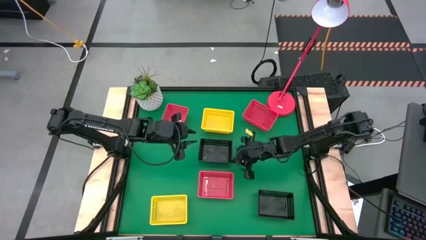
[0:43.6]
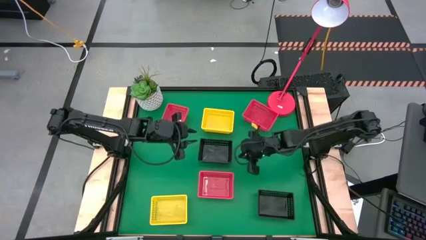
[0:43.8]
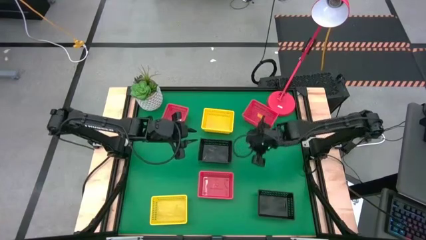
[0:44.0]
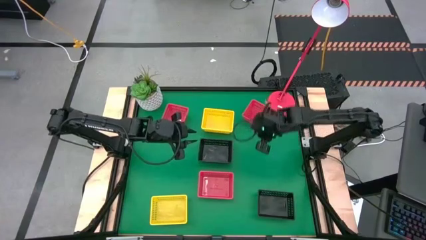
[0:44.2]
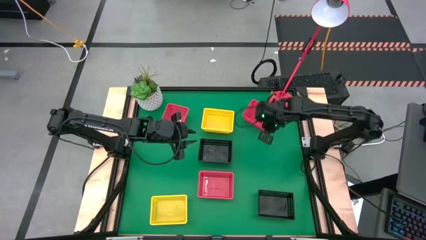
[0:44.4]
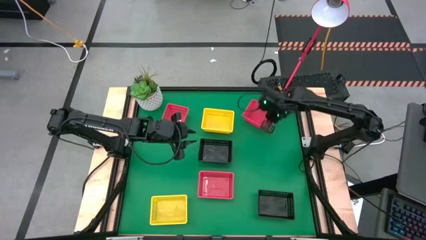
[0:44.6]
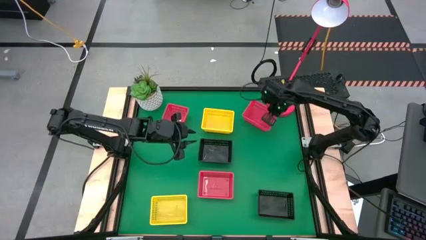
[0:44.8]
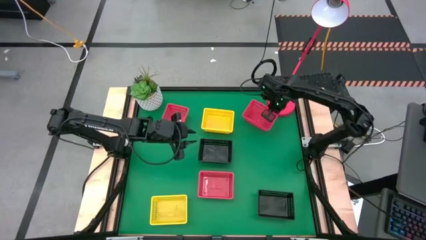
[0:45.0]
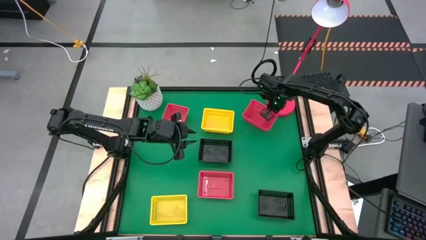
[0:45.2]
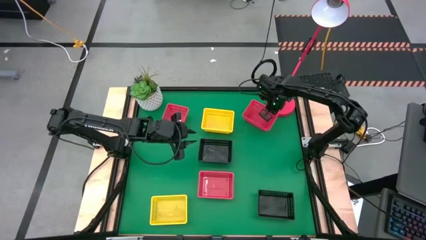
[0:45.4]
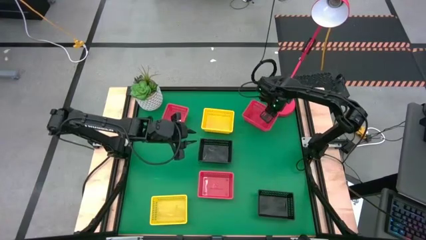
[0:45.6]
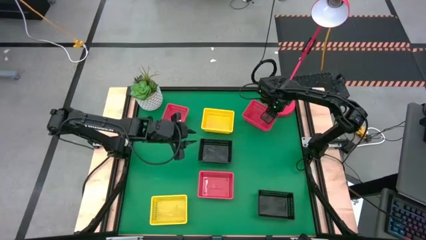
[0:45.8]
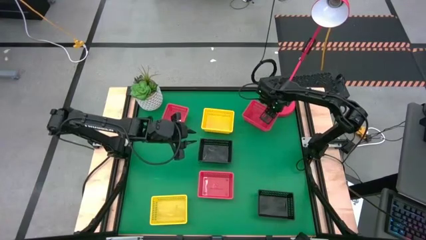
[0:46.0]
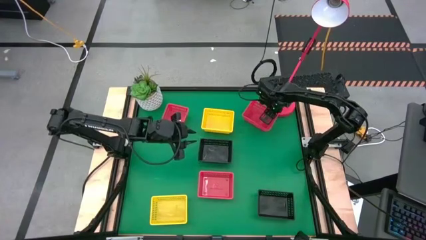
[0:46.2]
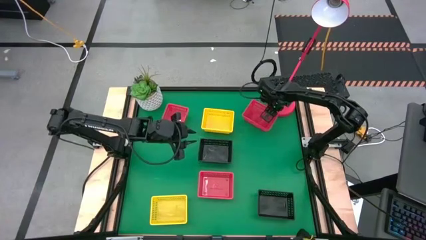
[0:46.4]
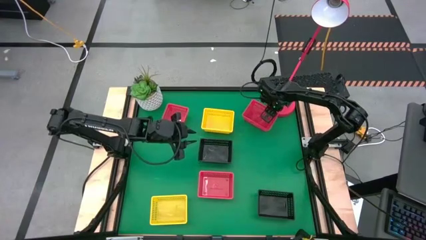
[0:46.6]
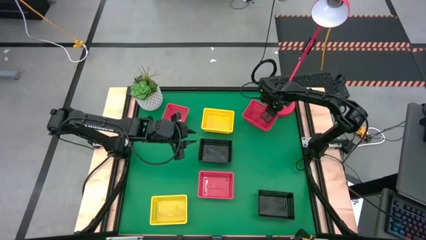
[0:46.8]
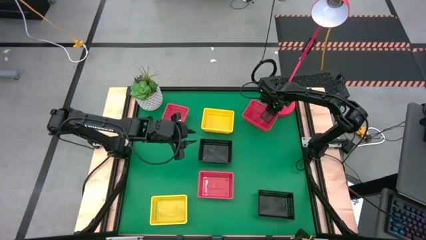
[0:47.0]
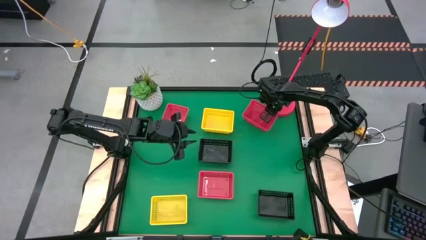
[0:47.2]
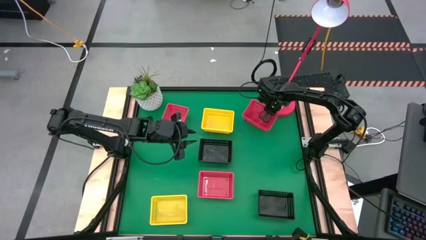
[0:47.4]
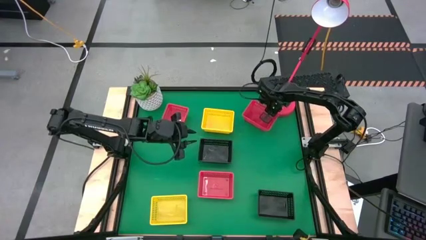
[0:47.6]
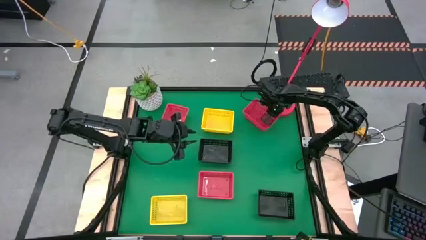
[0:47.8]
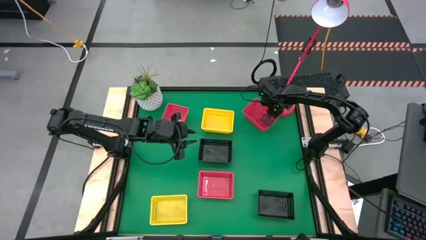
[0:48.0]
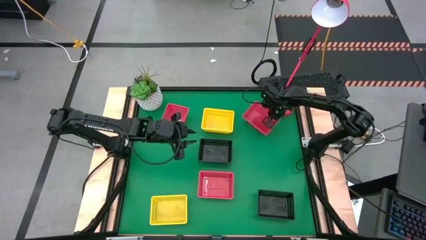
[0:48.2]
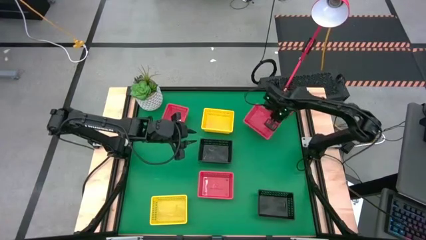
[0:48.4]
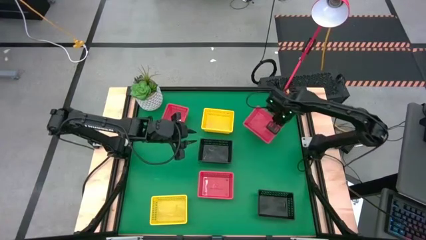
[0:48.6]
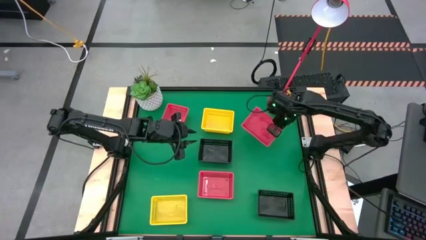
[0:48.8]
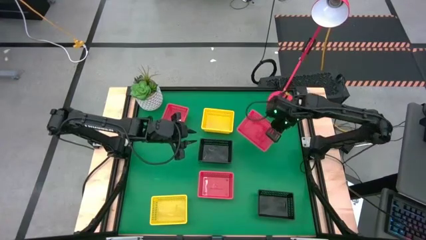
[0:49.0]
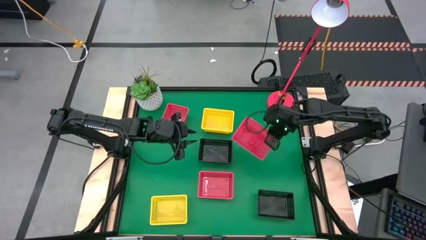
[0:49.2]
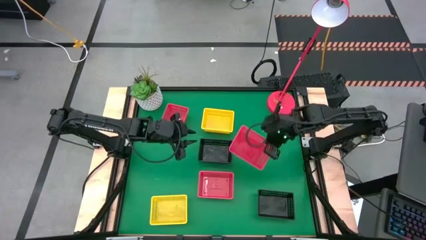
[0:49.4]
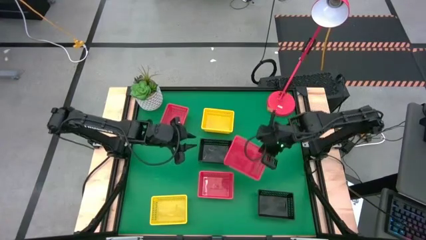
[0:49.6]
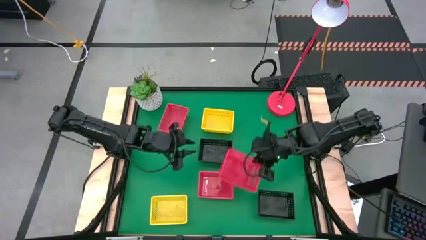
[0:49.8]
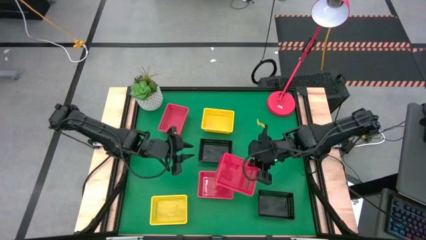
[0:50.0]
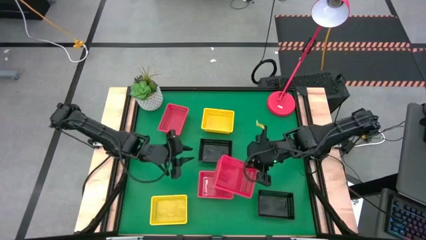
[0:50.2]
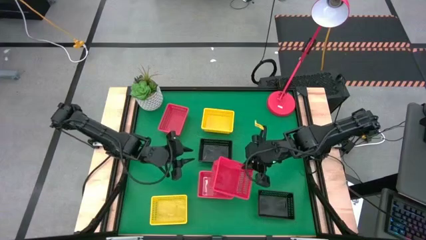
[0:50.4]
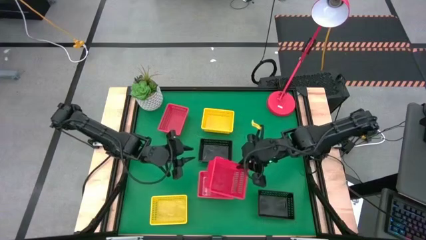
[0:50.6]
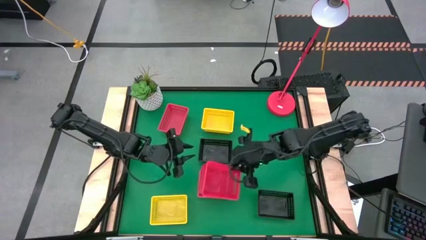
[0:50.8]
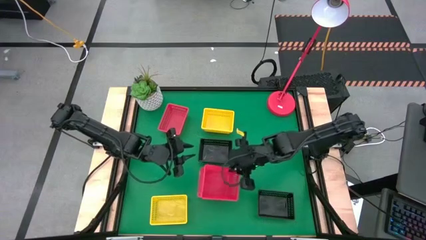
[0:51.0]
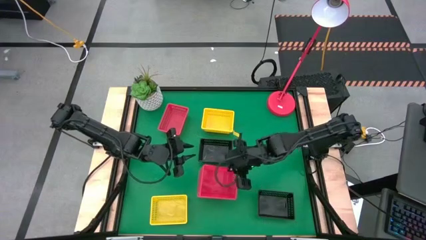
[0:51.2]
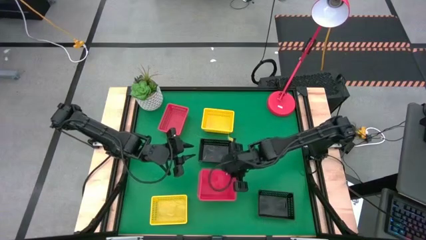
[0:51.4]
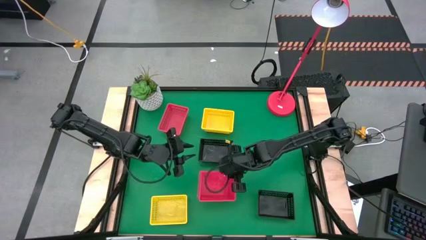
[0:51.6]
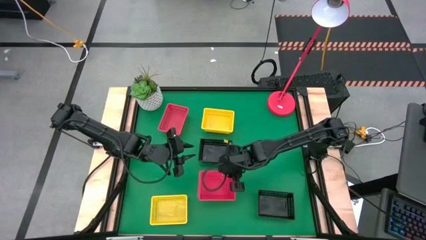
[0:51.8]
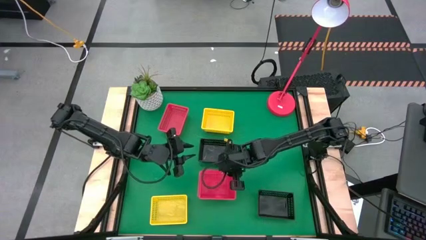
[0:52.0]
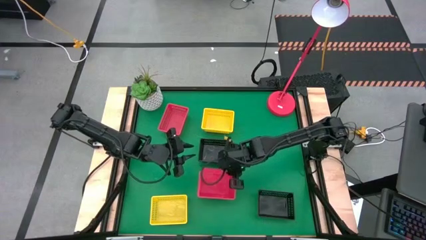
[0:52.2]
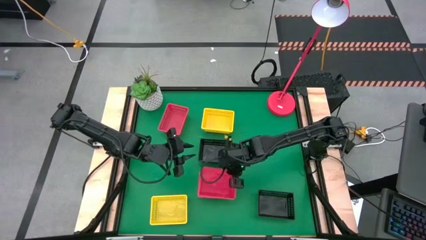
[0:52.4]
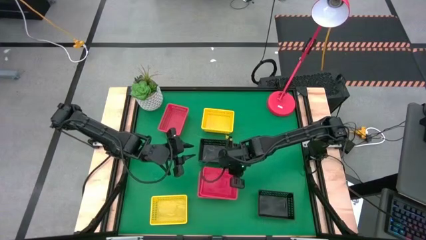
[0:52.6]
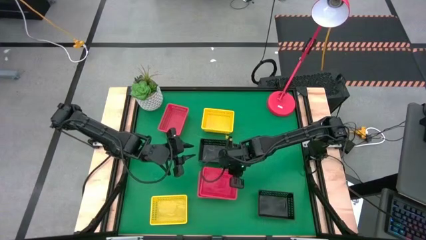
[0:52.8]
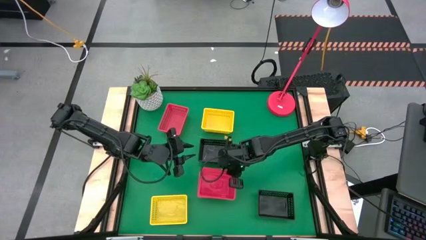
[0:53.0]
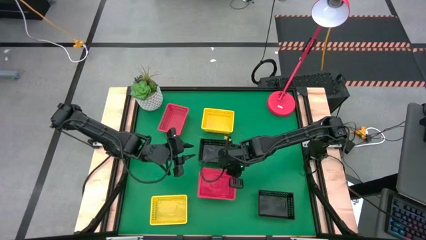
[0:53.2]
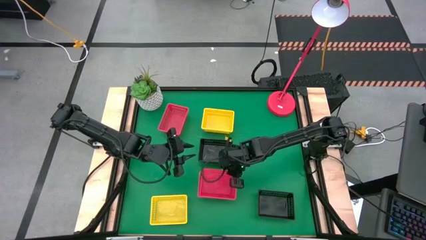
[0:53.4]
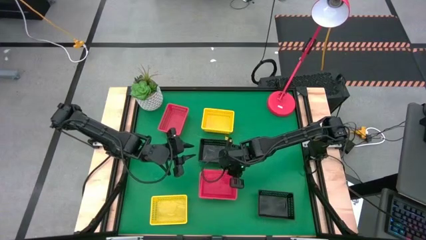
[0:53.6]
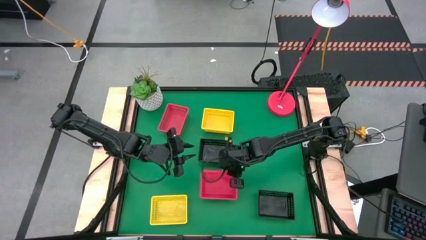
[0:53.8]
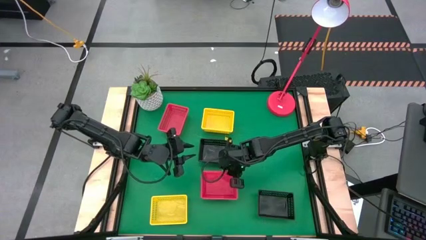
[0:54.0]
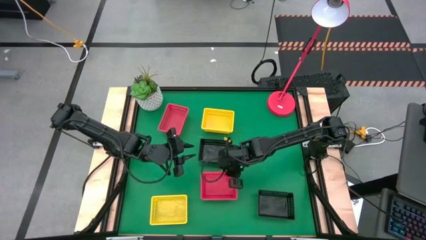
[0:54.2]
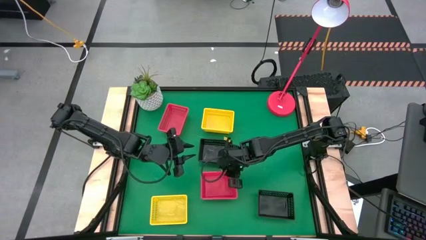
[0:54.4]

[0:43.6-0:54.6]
Stack the top right red basket on the bottom red basket

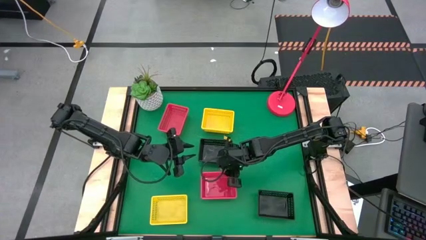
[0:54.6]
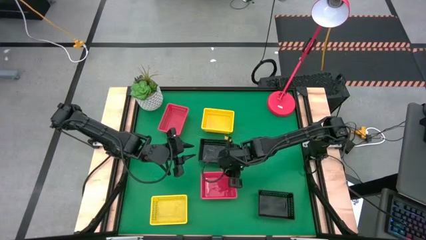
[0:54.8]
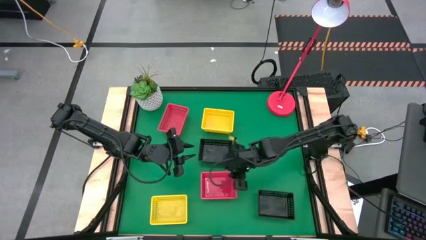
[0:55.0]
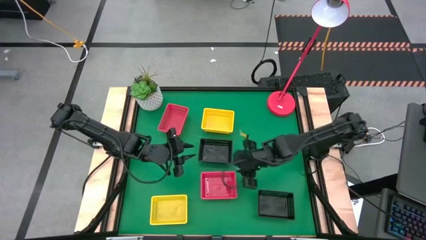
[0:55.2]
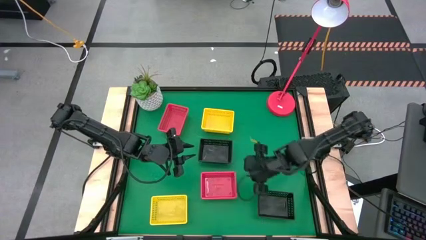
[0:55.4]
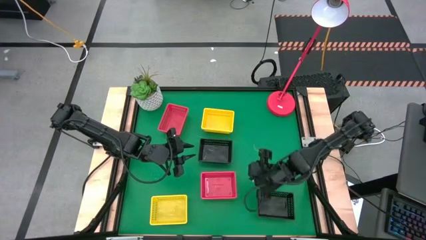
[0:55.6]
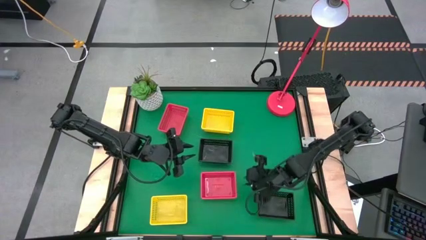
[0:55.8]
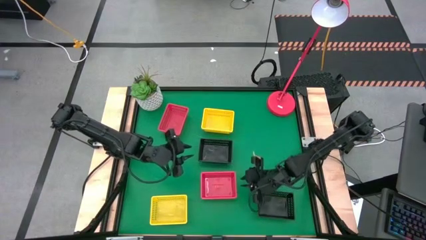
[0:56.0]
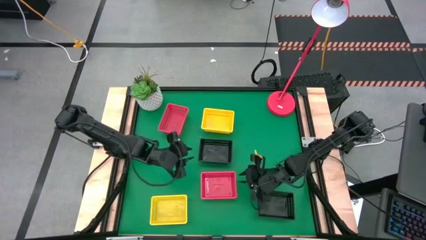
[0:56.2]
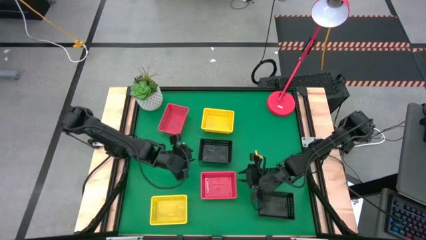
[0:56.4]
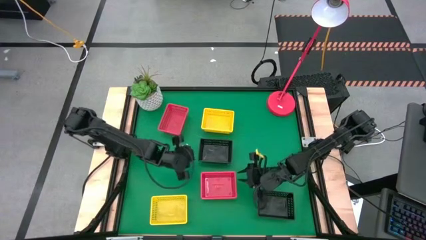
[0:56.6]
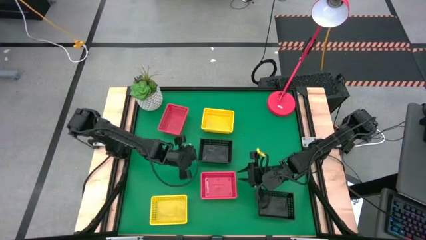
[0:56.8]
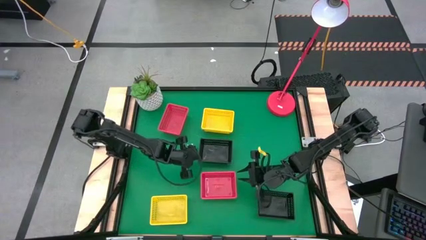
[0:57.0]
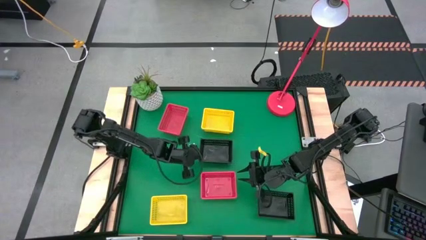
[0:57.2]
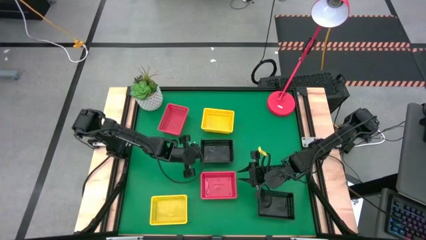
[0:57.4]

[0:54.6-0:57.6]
Adjust the black basket

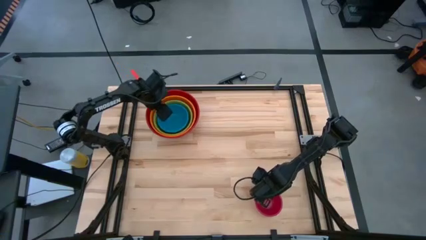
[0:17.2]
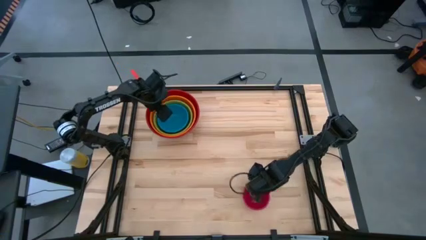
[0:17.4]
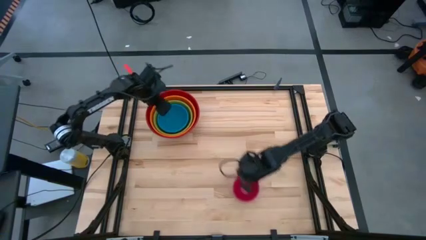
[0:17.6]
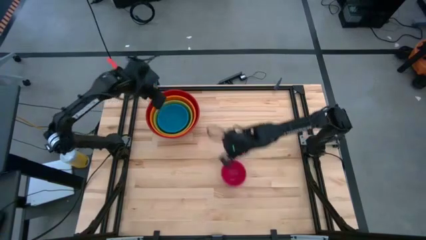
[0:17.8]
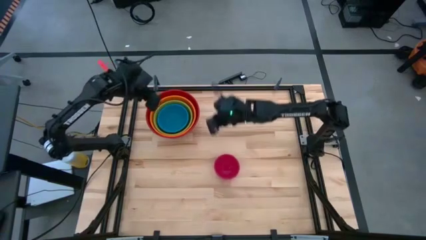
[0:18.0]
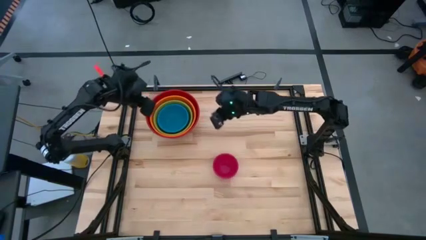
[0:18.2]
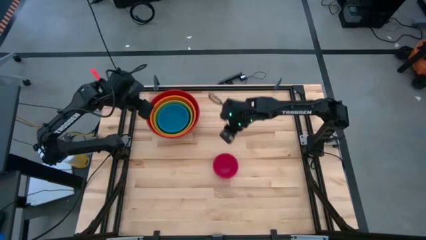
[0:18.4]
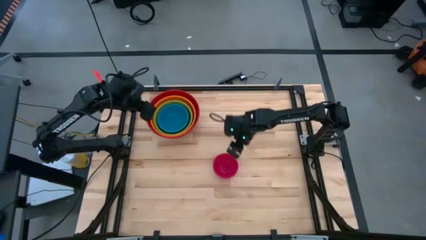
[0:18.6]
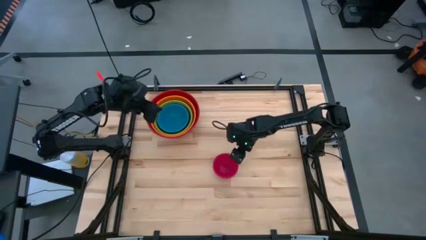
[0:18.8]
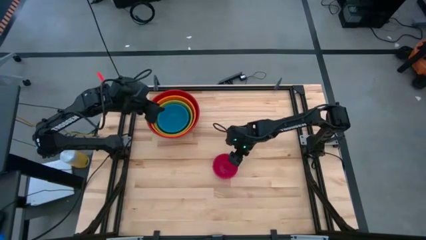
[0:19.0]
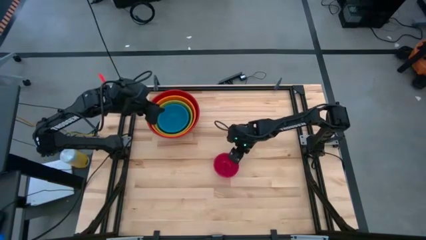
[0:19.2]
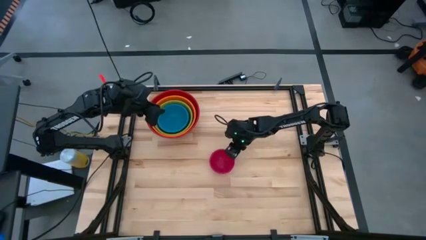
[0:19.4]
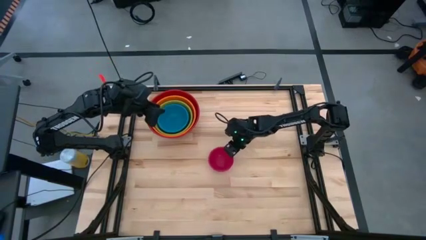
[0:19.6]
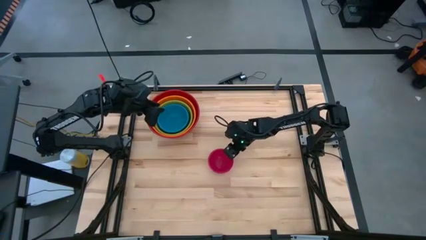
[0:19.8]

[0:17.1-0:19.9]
Stack the pink bowl on the blue bowl

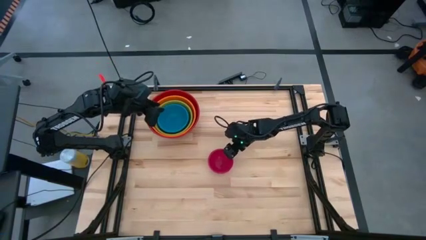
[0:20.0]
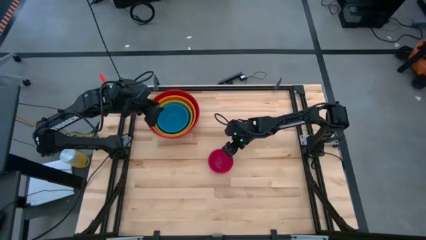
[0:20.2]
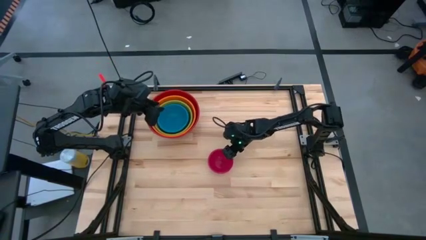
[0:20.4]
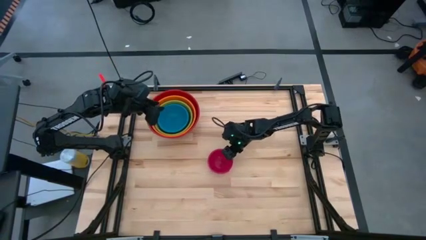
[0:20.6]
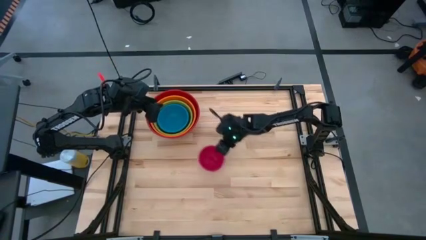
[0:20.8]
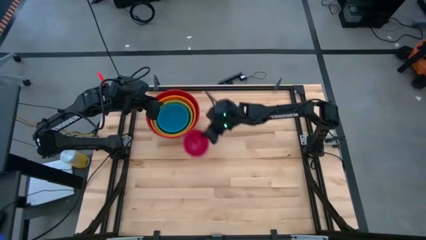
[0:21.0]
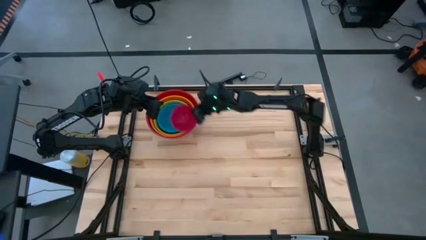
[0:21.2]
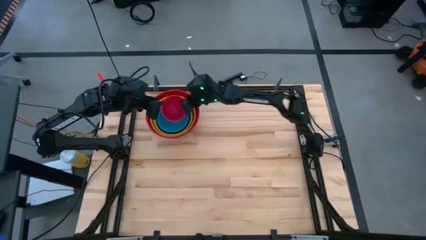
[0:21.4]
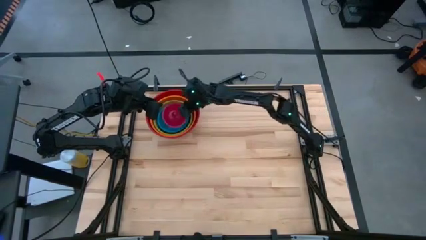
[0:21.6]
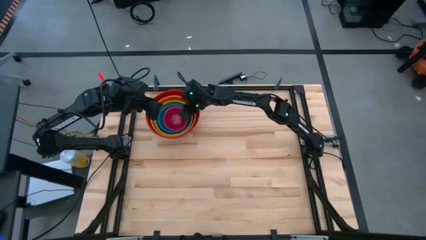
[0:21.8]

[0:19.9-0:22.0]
Stack the pink bowl on the blue bowl
